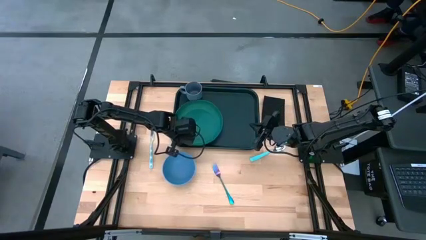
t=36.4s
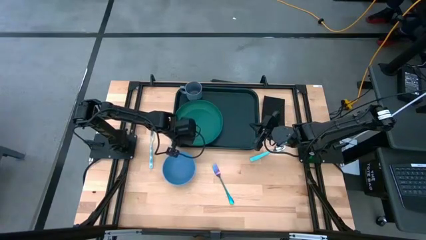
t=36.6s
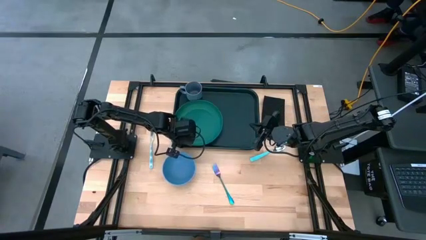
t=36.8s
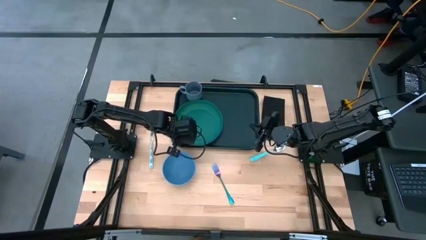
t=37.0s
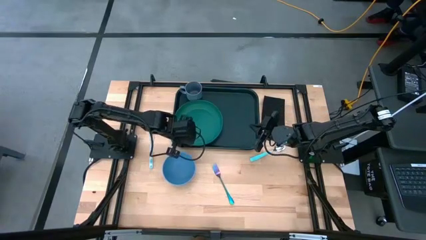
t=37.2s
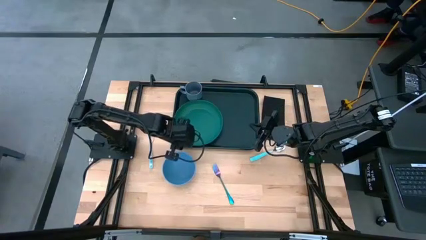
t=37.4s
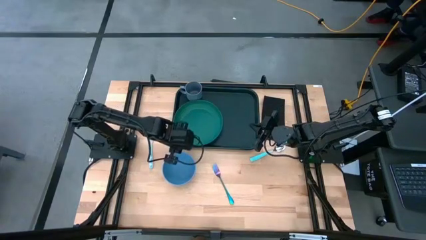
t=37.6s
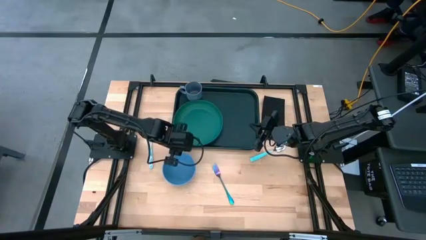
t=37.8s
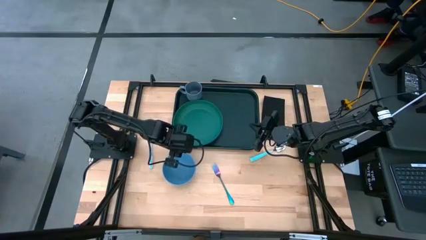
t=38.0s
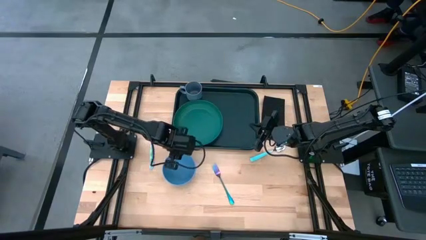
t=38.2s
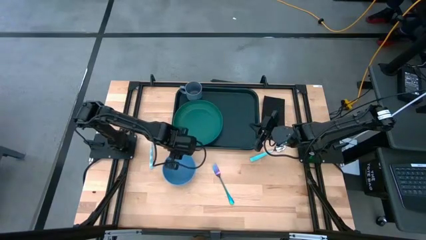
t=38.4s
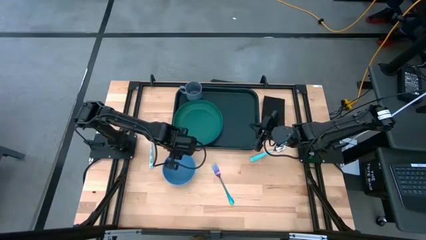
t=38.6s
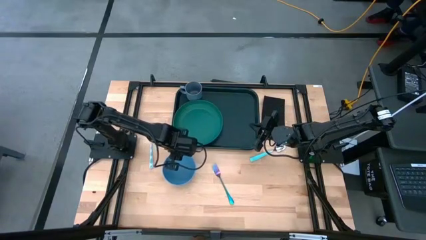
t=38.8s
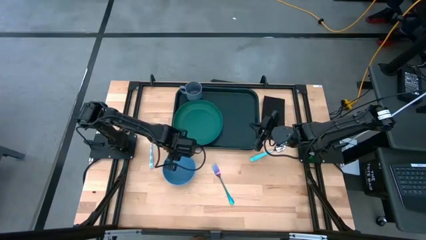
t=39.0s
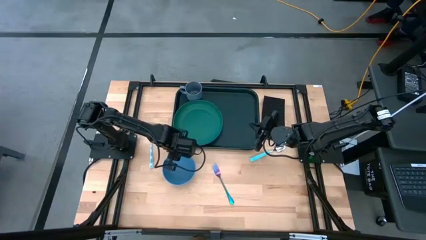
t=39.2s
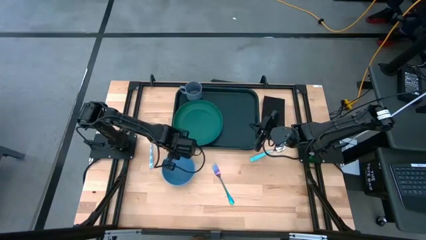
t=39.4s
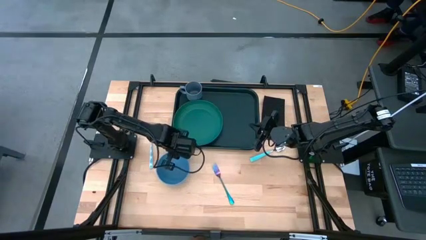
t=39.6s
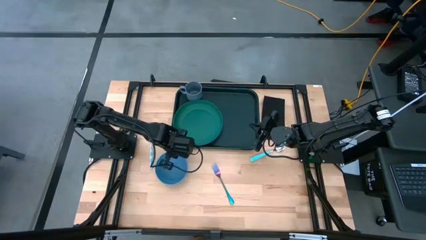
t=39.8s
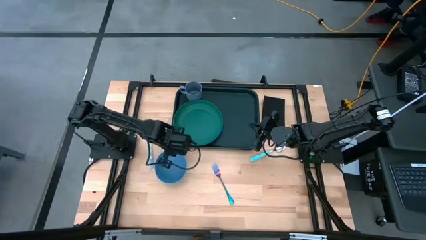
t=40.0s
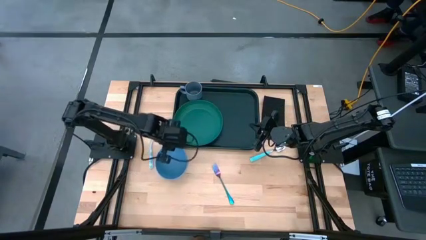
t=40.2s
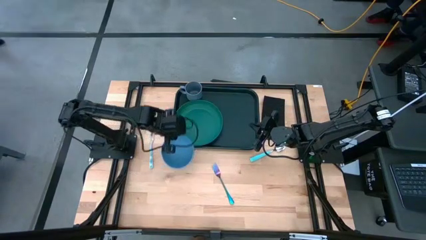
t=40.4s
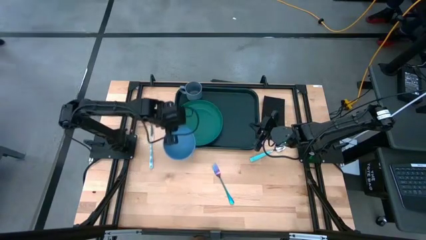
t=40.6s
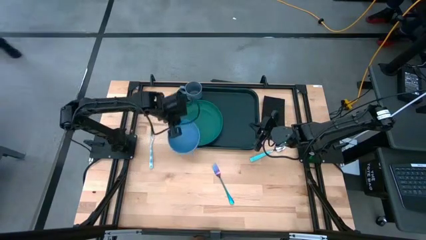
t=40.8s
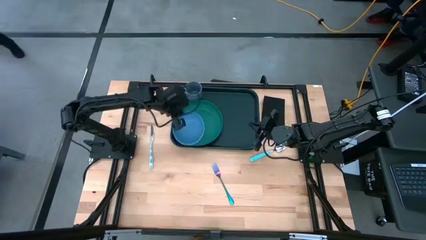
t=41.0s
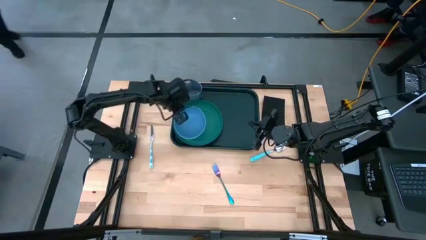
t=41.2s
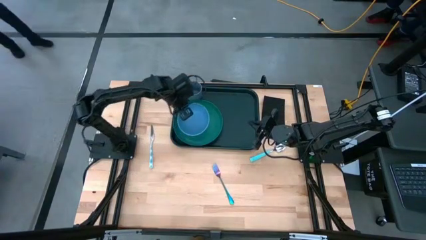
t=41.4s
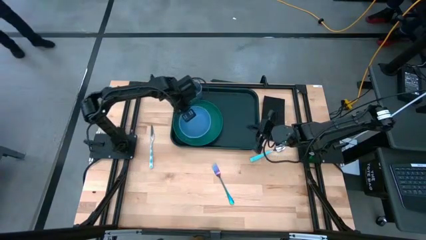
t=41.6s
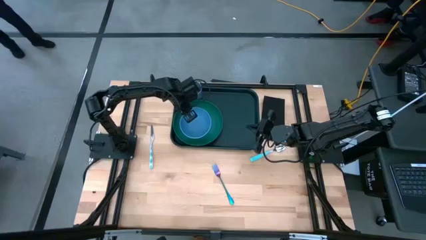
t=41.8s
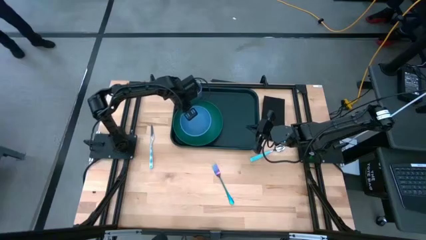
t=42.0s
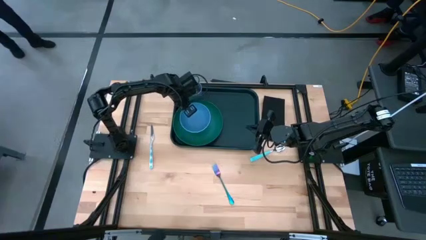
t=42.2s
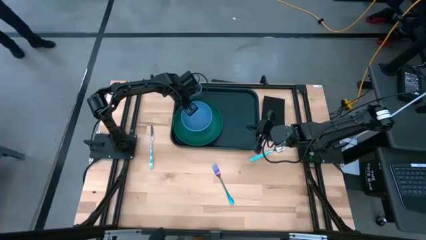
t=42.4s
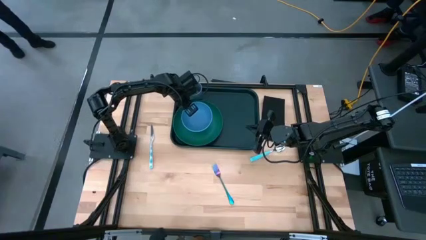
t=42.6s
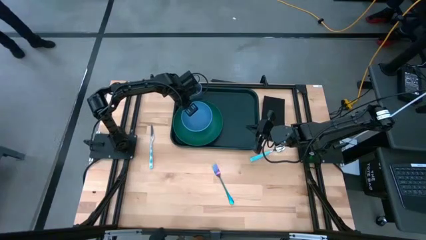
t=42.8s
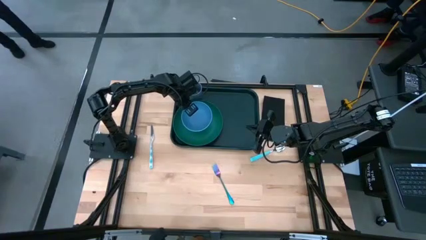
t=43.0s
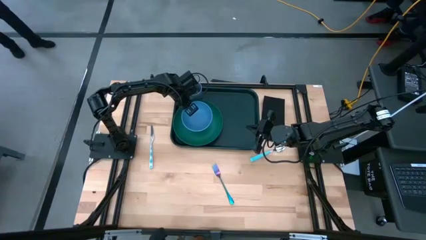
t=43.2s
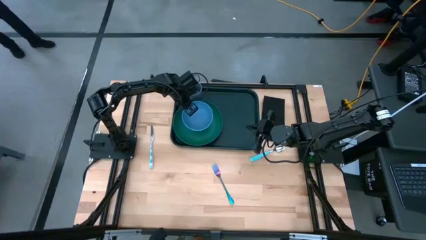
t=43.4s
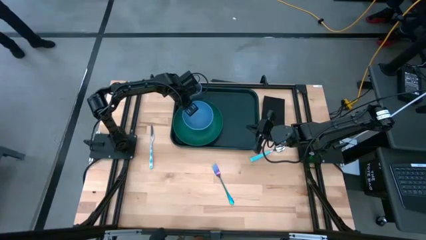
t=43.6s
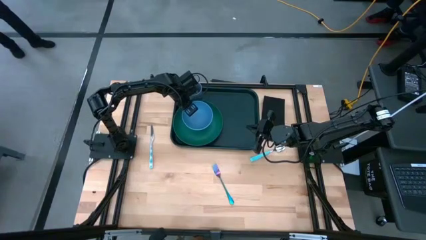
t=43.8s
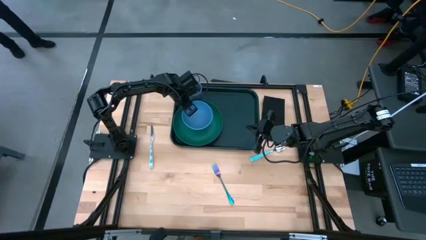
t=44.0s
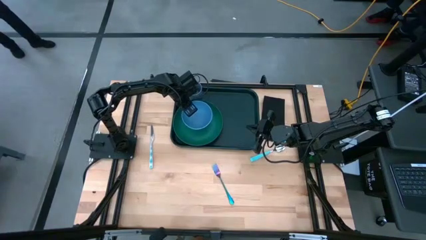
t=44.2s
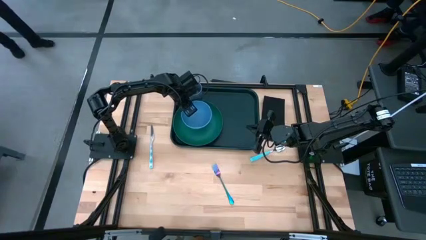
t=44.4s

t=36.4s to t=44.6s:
Task: Set up tray
Put the blue bowl on top of the green plate

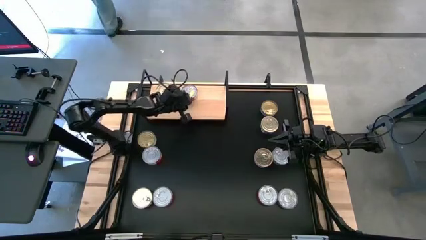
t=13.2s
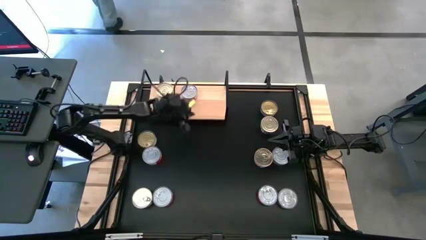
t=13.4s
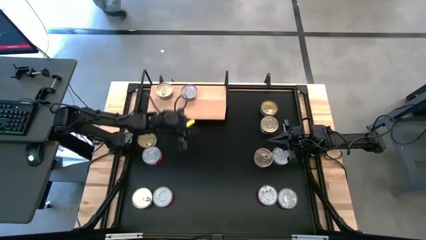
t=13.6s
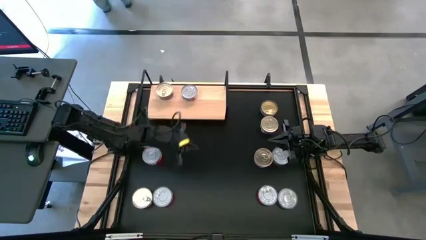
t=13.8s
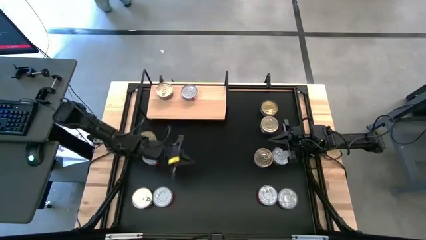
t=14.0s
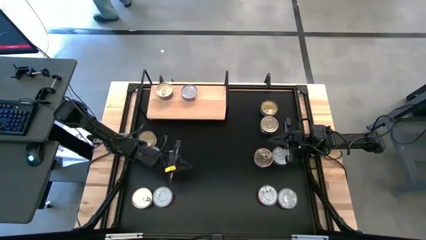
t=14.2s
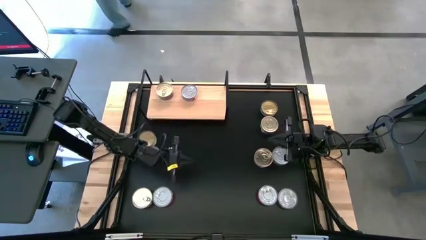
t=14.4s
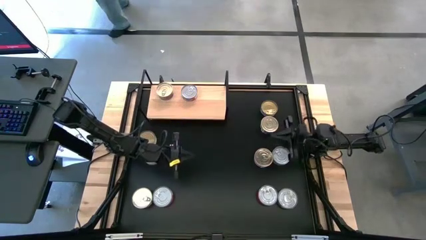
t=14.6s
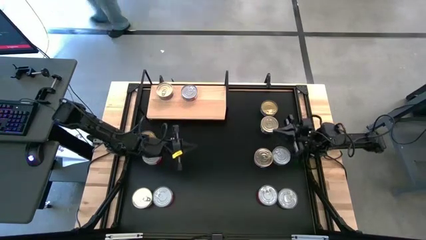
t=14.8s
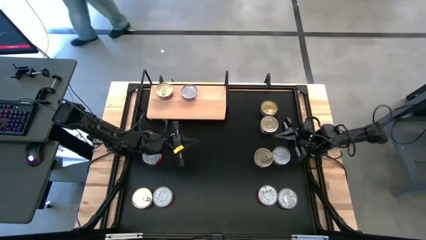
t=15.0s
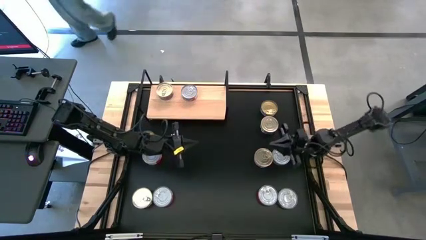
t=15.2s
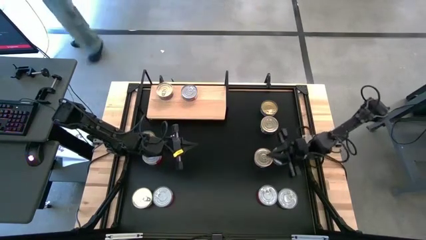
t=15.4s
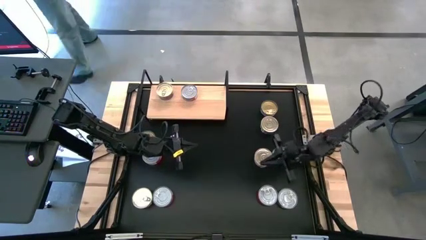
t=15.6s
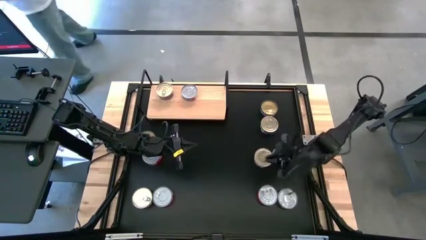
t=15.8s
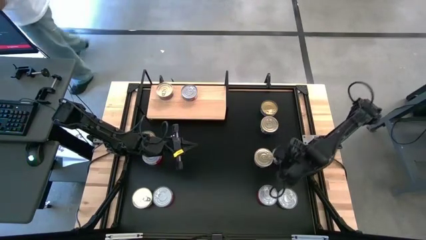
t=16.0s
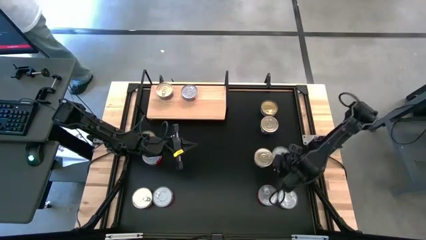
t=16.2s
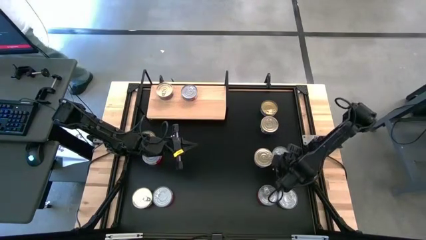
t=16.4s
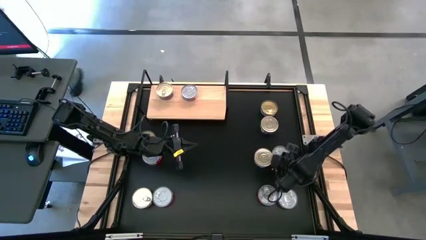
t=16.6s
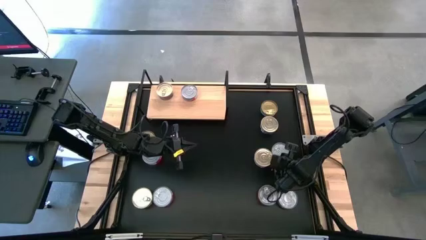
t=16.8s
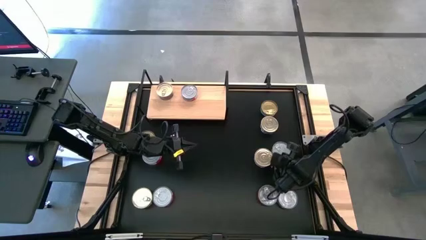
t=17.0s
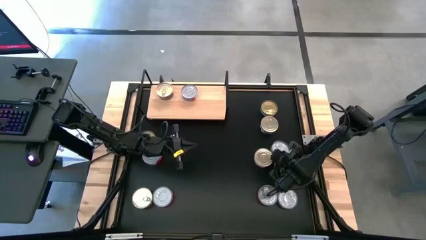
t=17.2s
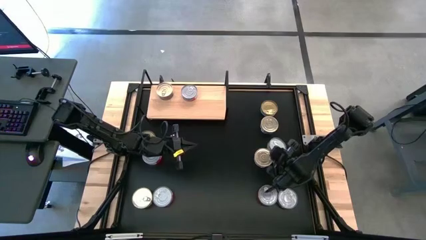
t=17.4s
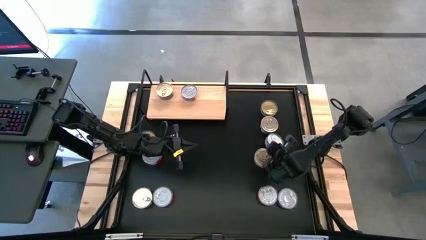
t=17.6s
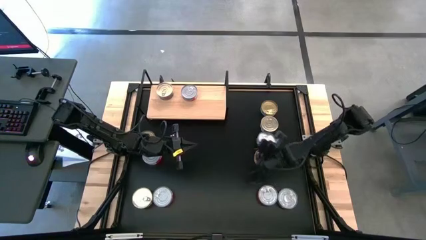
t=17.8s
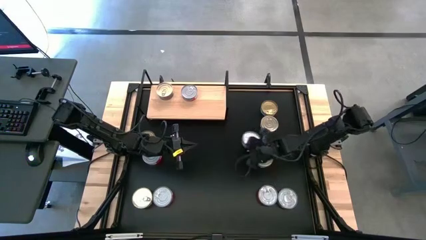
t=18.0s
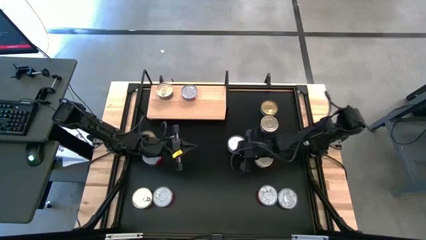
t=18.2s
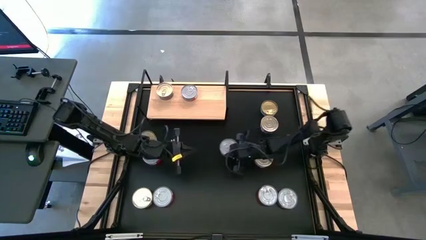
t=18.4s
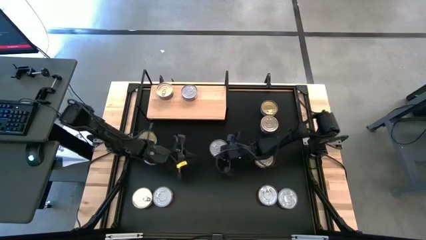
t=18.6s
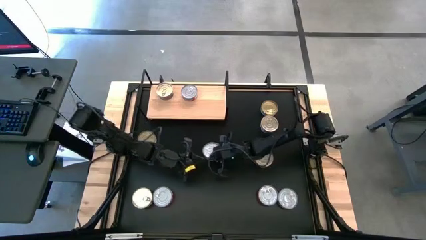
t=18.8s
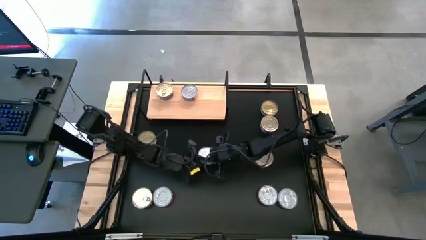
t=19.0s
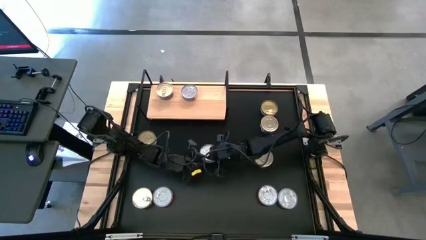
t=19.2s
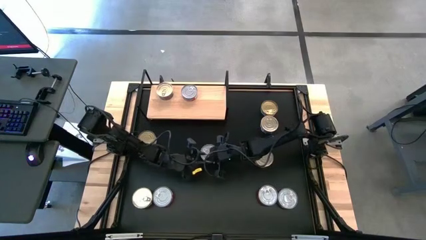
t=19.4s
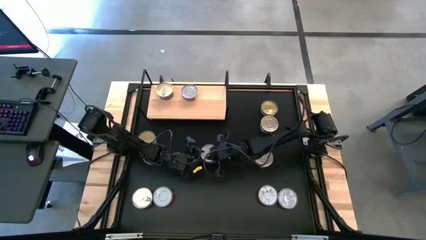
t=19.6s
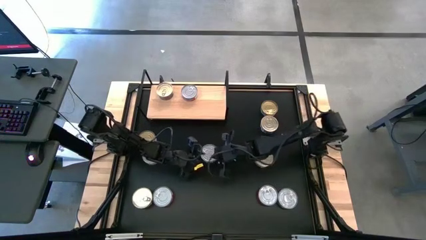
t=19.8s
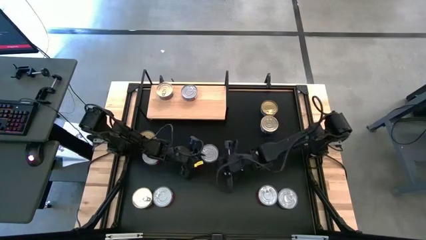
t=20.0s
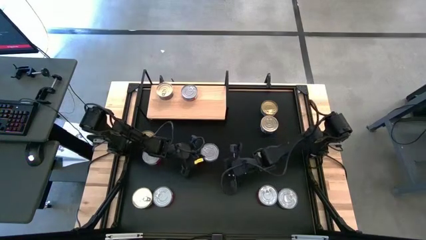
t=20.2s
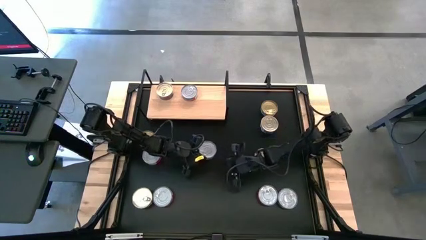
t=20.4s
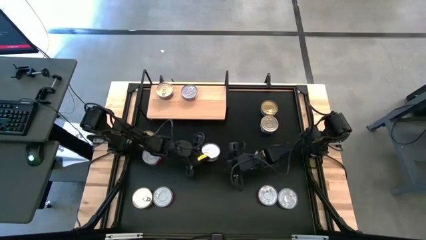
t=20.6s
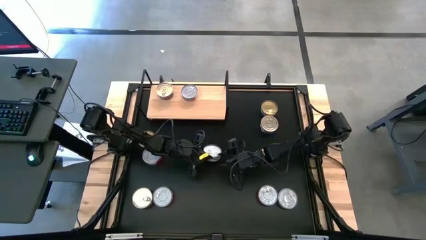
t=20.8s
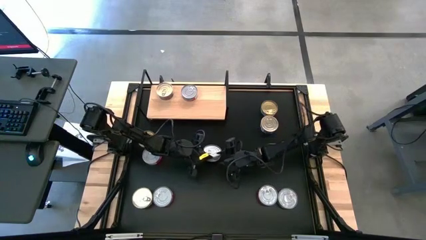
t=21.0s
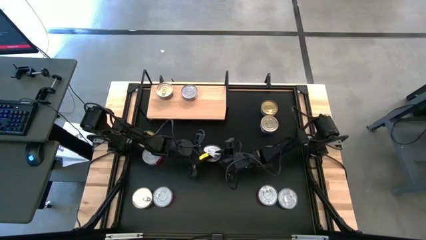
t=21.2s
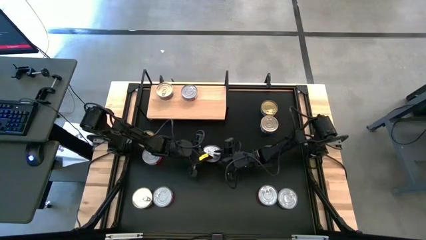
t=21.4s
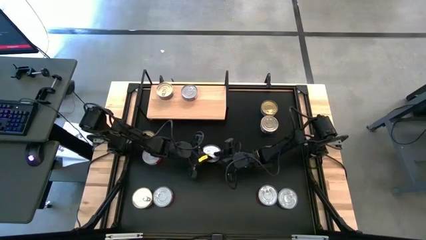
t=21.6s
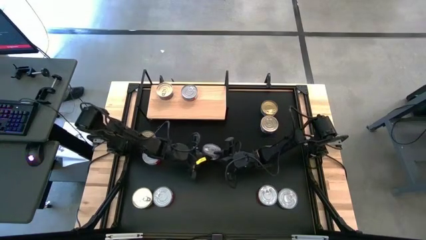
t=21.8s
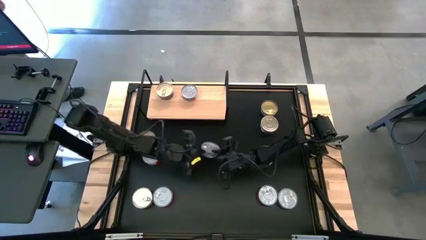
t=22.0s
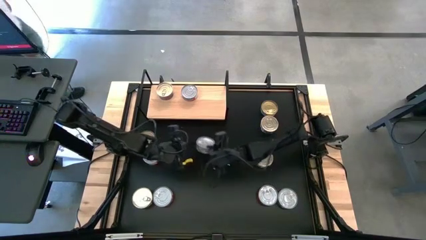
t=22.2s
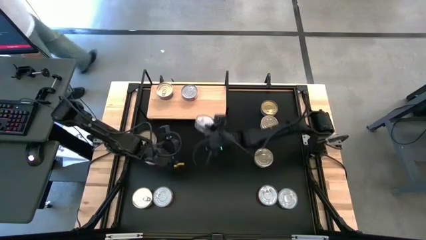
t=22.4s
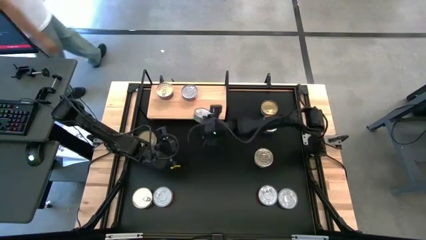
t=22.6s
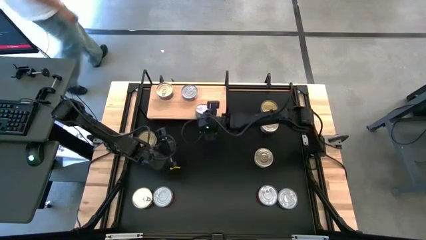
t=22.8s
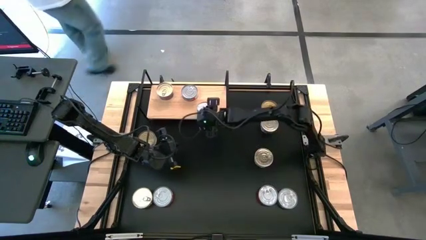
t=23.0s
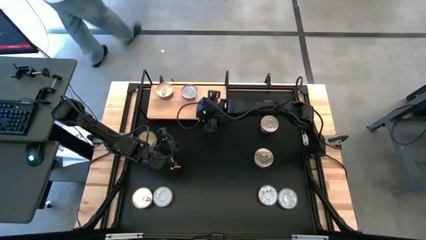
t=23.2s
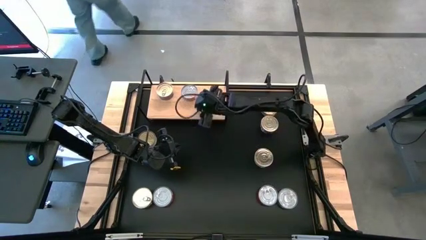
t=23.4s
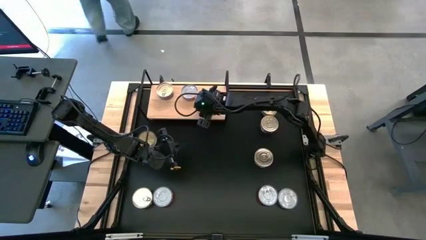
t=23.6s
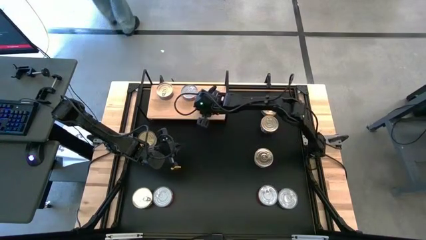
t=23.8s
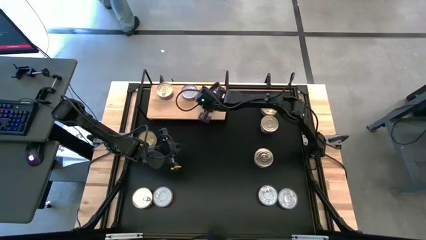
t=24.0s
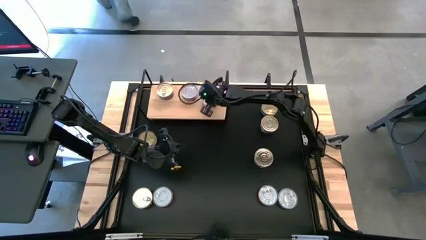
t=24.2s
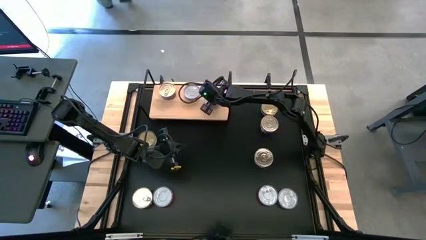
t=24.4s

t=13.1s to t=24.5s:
Task: Stack canned seafood by type on shelf
Put the middle right green tuna can on the shelf
